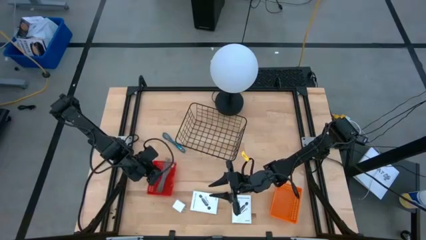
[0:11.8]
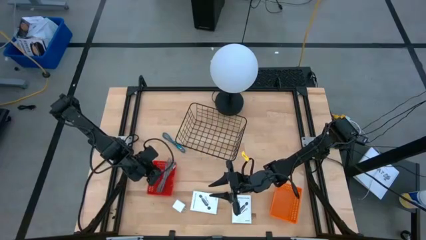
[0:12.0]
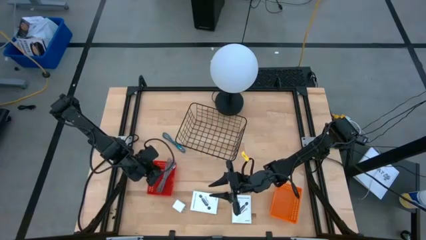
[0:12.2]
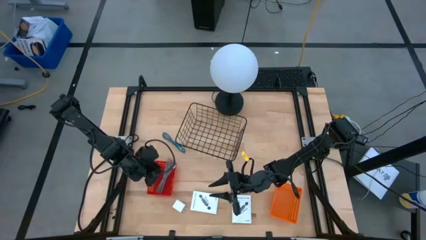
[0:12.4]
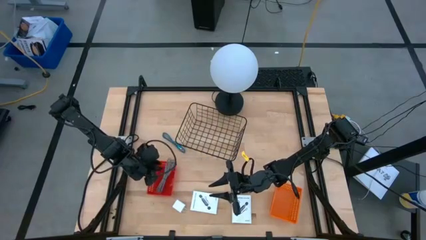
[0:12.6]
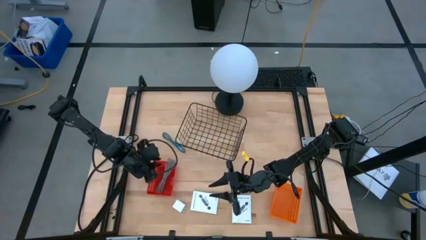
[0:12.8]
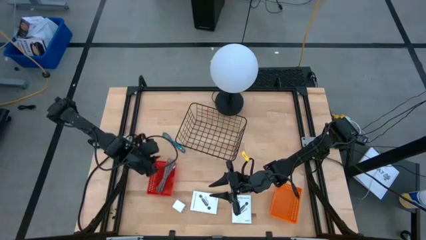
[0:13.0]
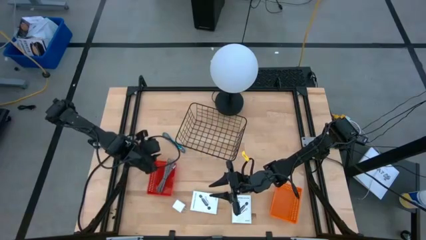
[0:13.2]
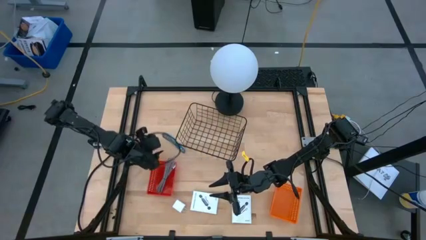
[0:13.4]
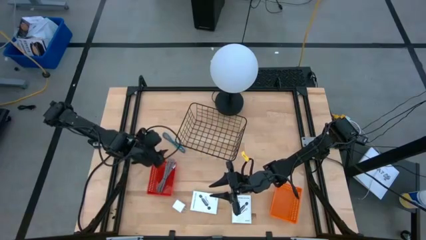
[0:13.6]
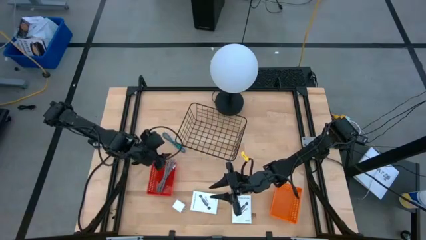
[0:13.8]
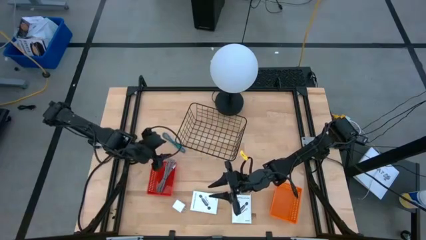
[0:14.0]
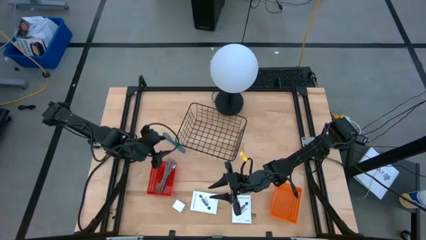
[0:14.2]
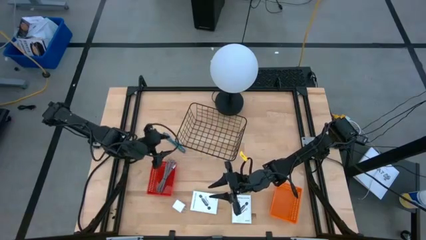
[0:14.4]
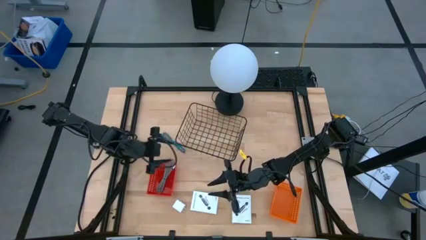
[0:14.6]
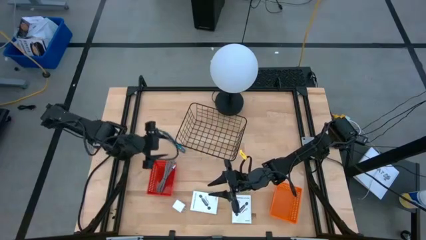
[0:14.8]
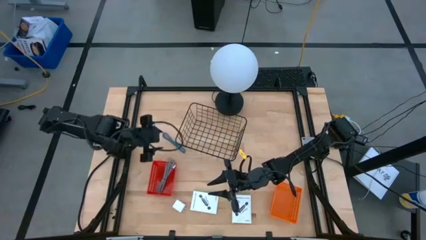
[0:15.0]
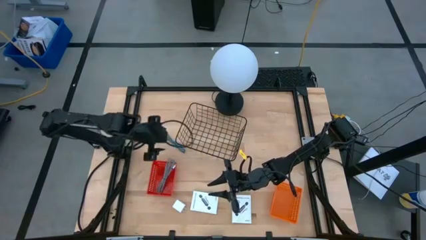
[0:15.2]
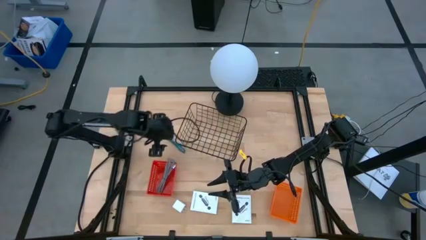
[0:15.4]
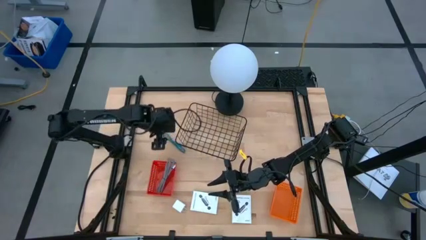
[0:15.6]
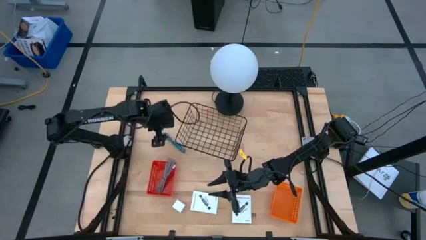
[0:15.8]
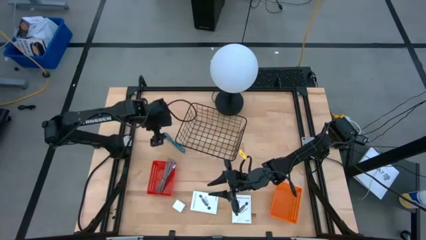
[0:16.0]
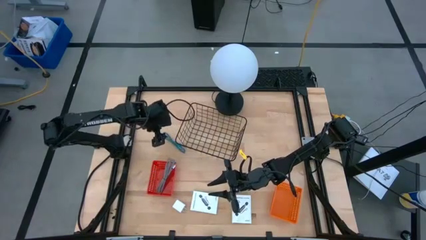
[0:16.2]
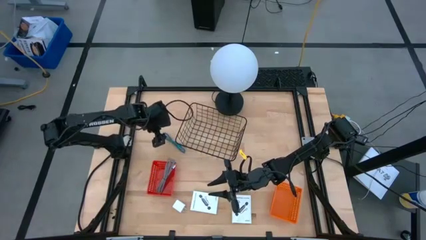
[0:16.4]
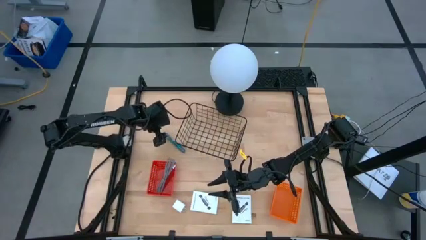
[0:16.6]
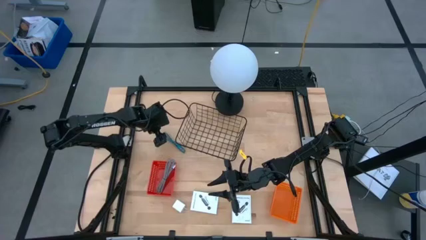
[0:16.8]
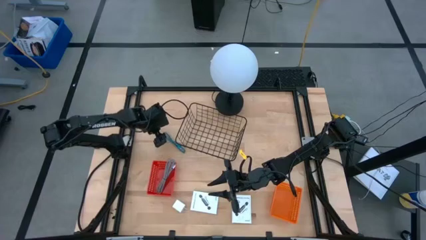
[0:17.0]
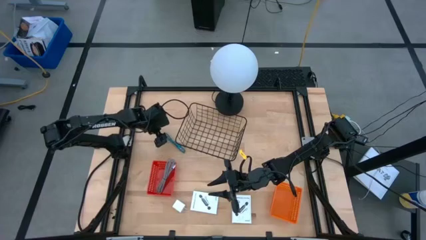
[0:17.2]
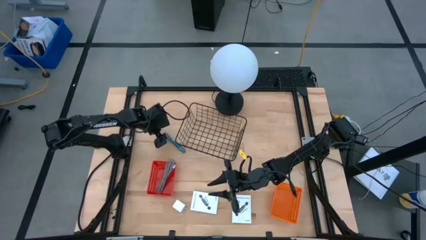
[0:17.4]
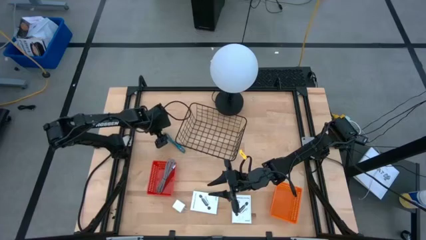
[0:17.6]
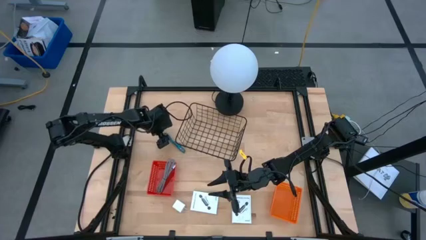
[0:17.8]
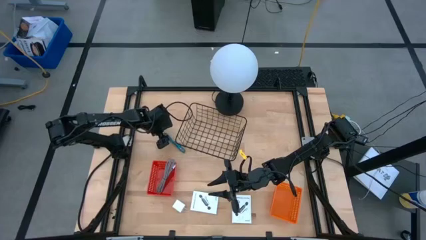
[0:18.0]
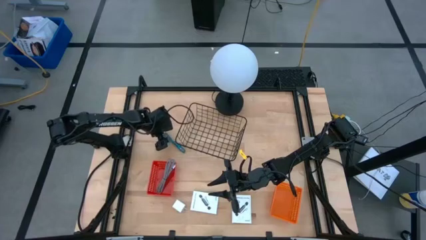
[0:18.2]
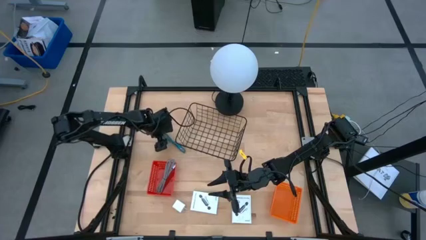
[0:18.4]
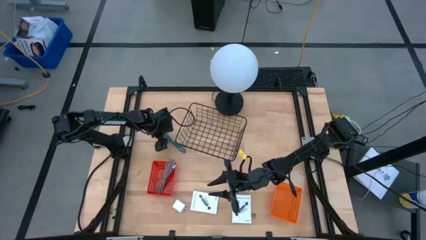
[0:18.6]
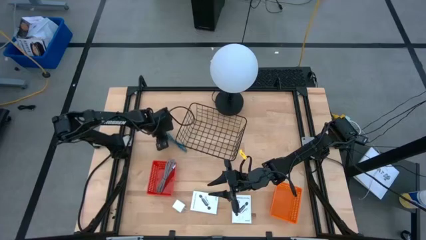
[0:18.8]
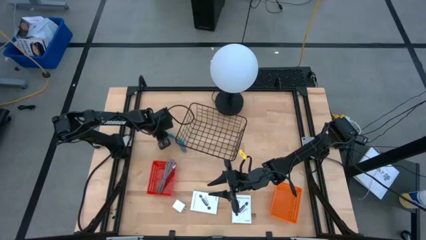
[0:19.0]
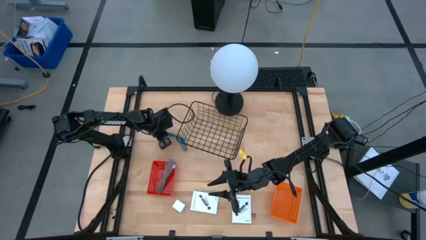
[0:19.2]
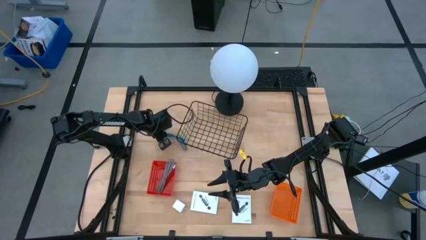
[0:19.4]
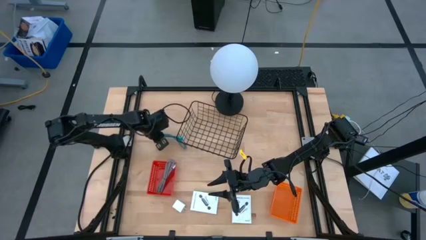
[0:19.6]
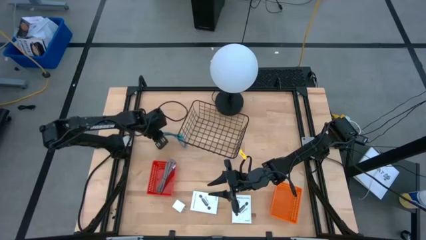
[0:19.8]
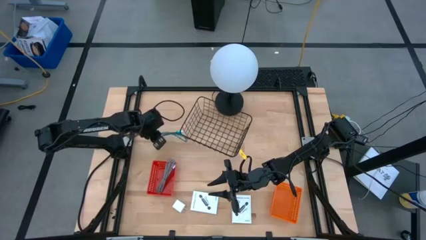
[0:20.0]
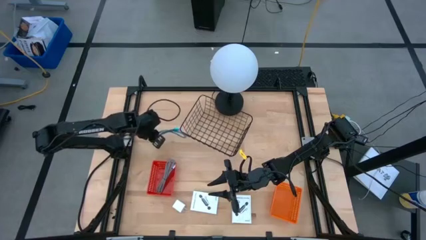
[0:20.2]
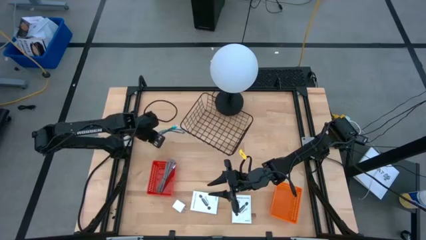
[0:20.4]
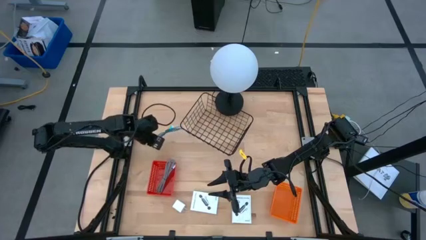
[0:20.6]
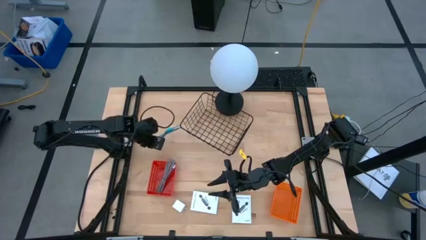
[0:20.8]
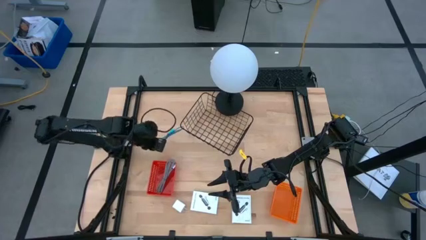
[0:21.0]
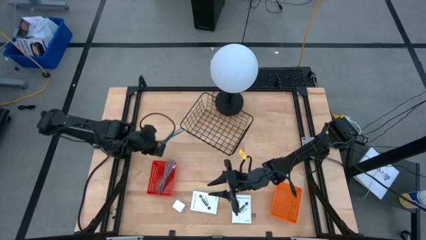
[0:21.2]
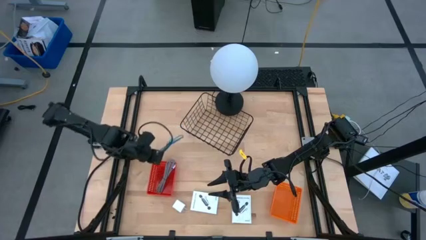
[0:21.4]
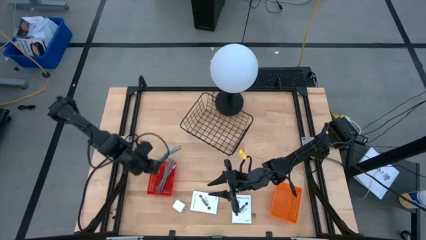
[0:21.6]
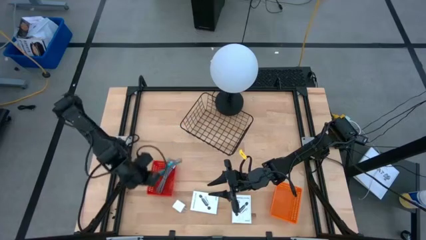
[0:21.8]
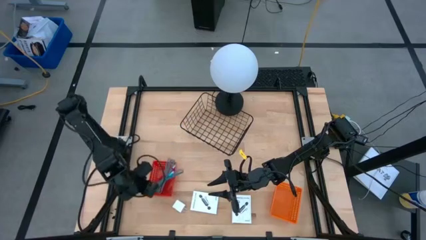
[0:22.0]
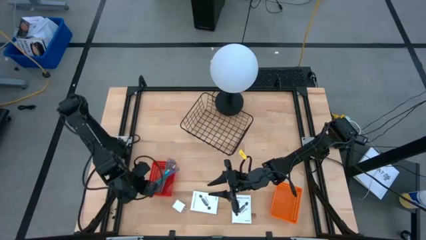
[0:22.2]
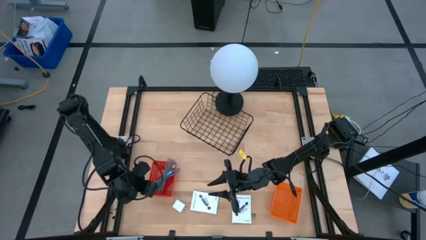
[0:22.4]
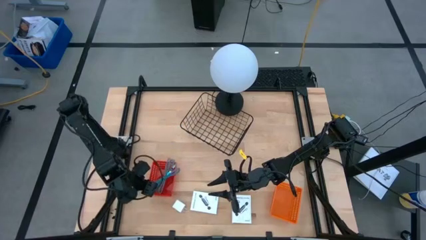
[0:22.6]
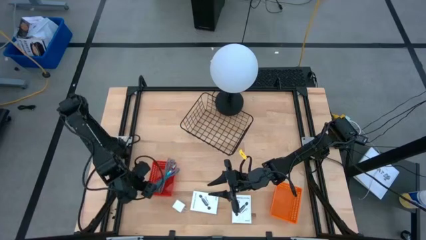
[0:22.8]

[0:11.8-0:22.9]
Task: Pick and place items into bin
Put the blue USB cable into the red basket

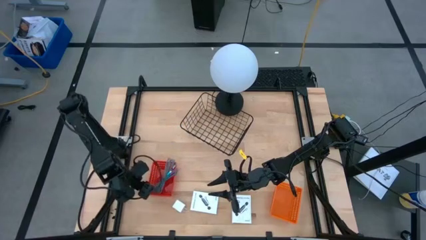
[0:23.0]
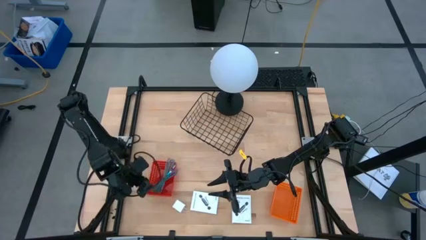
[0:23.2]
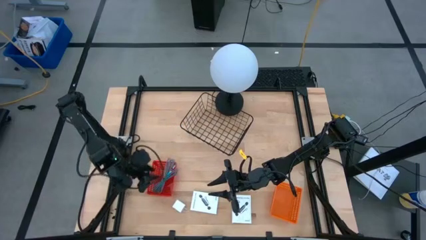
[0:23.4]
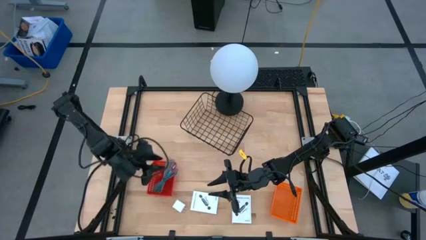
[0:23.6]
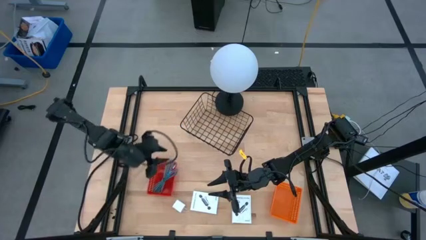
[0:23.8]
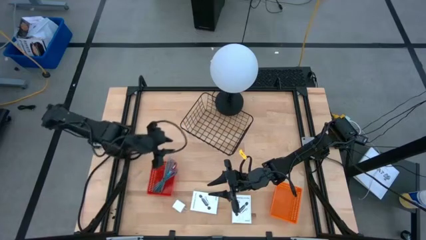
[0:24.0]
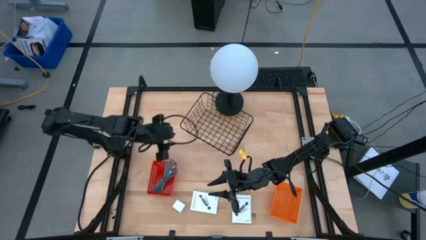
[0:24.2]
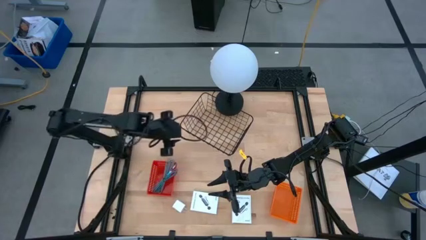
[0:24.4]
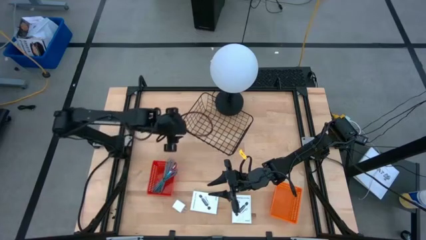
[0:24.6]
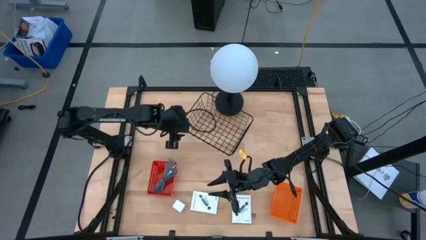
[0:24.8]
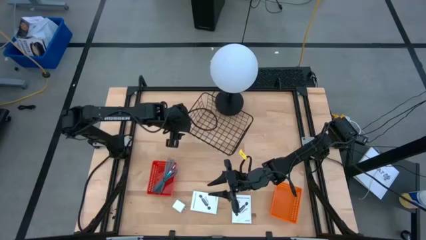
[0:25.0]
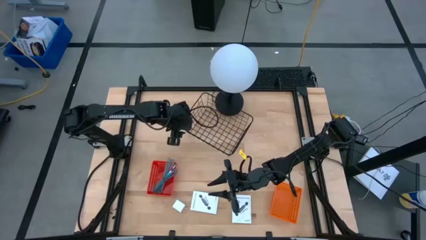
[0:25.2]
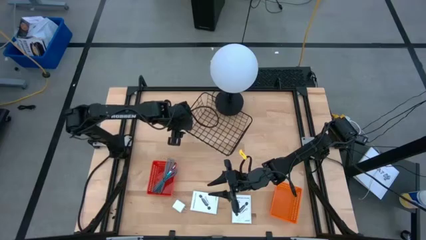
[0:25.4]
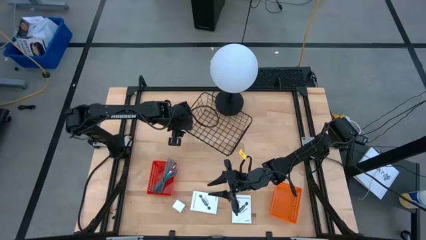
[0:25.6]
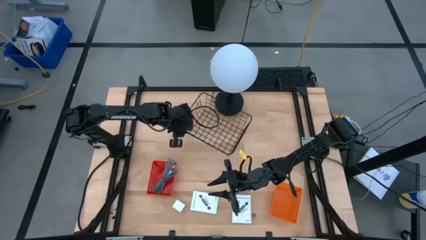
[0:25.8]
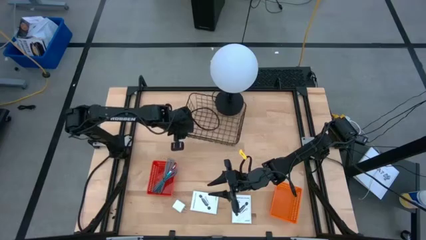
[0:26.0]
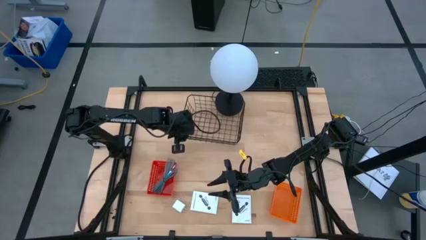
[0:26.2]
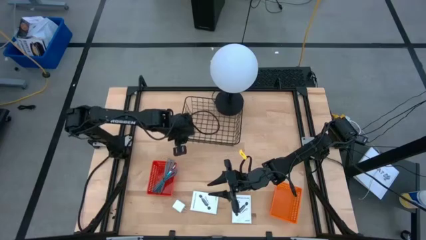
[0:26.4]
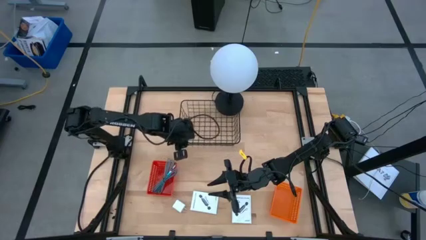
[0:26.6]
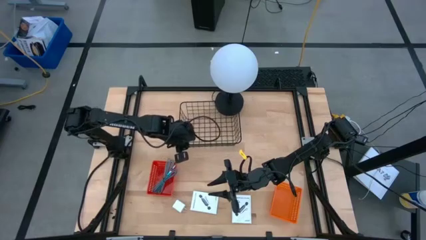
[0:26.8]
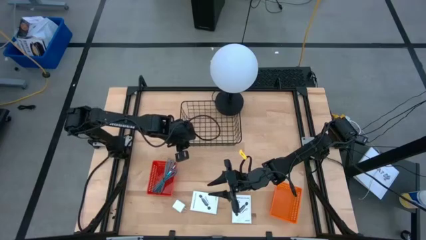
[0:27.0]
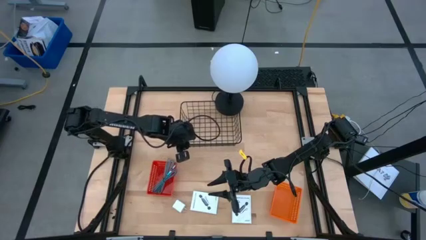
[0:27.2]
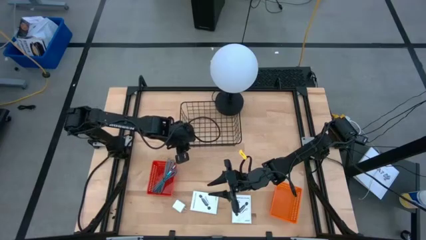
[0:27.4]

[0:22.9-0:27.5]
Adjust the wire basket
